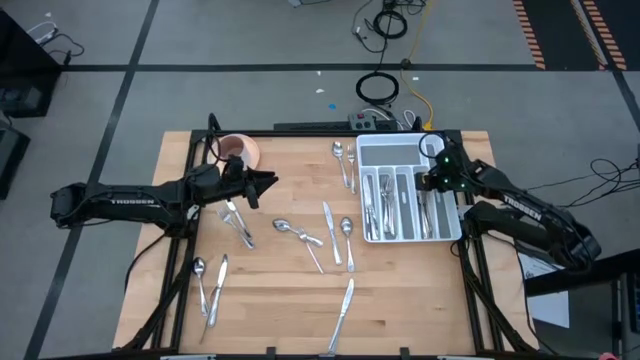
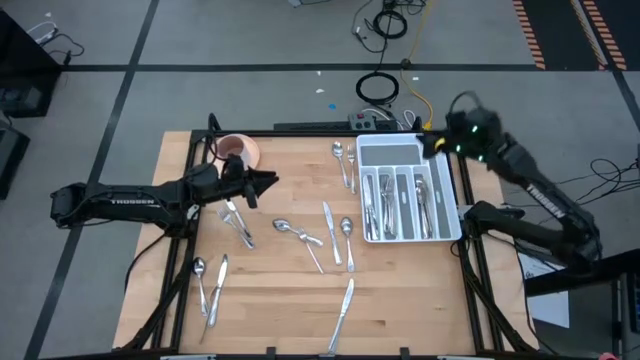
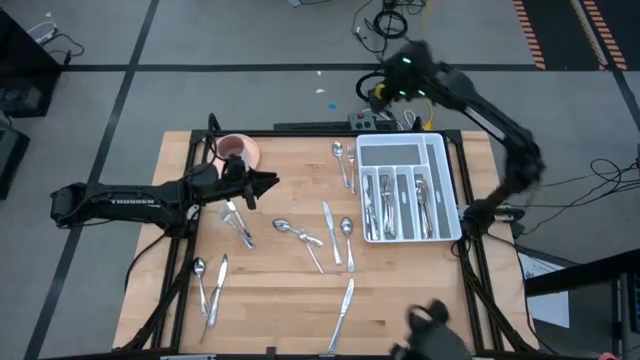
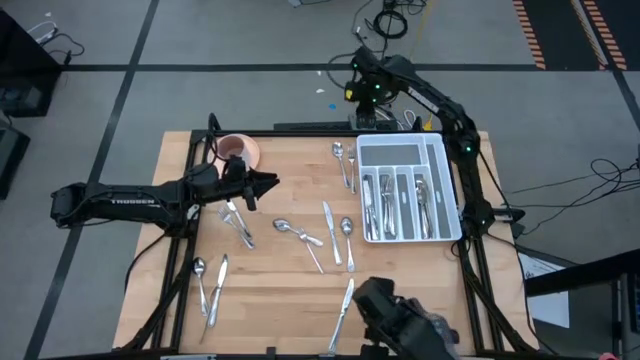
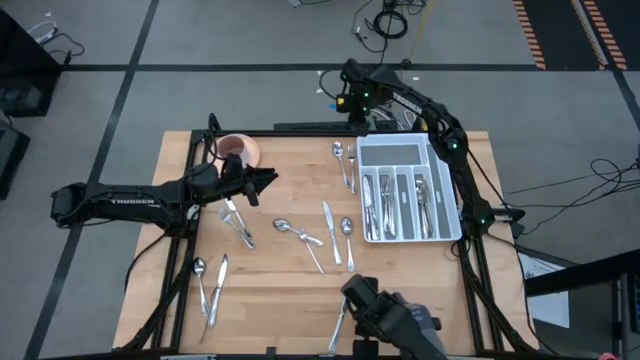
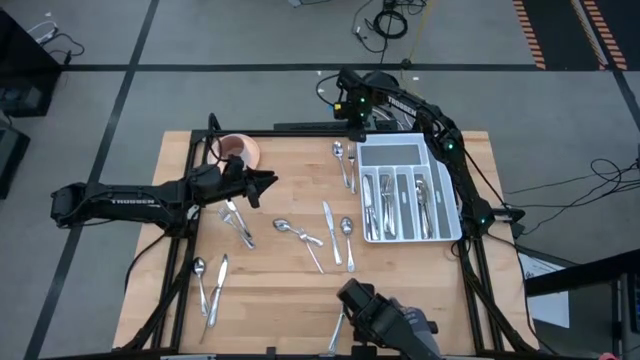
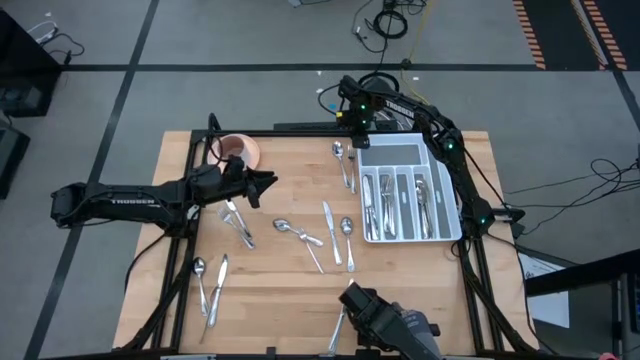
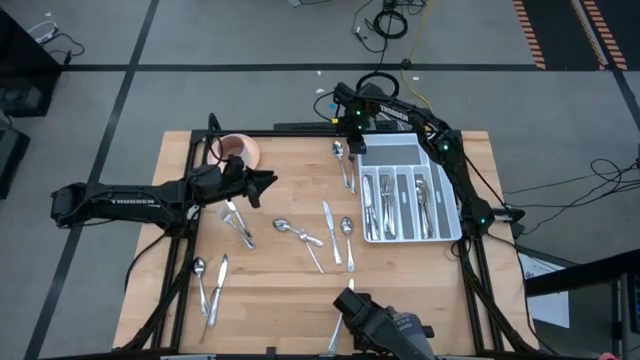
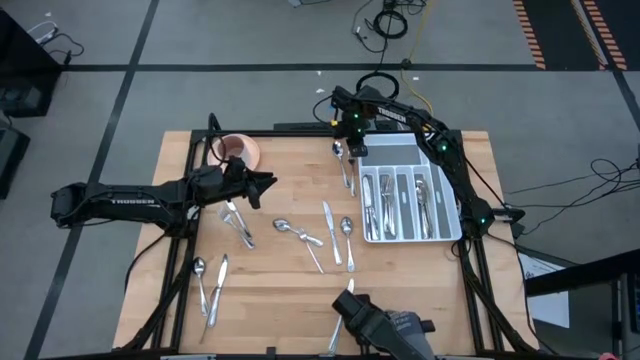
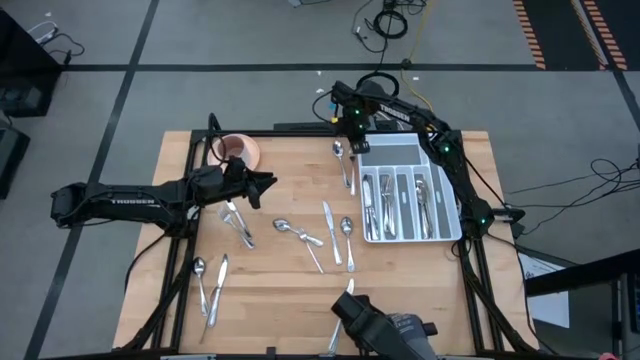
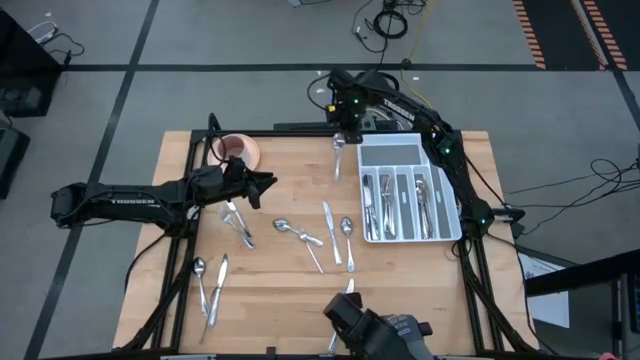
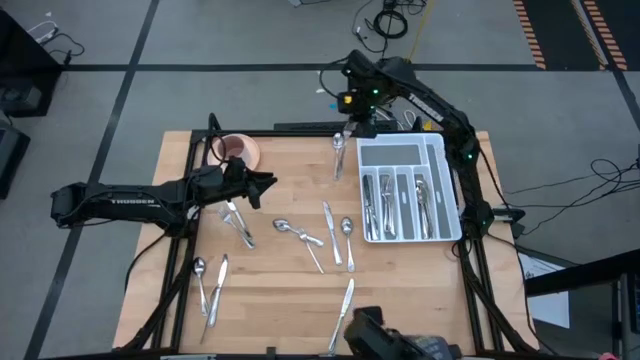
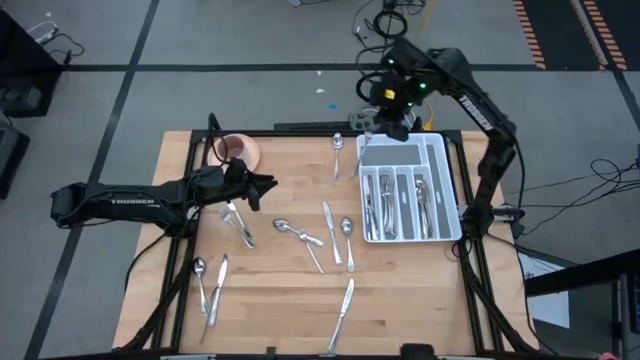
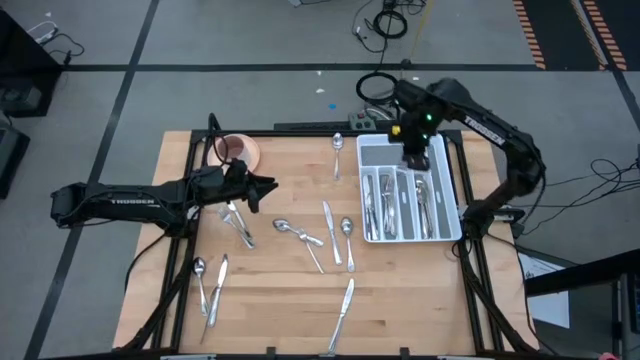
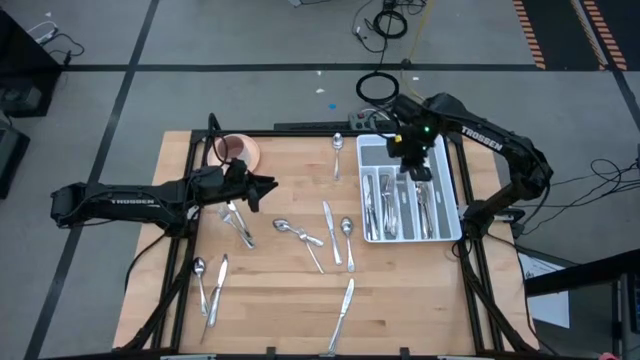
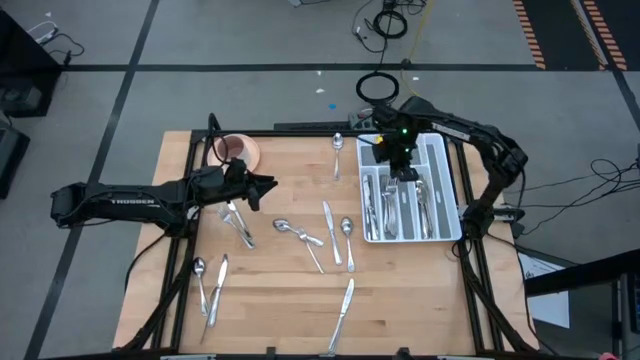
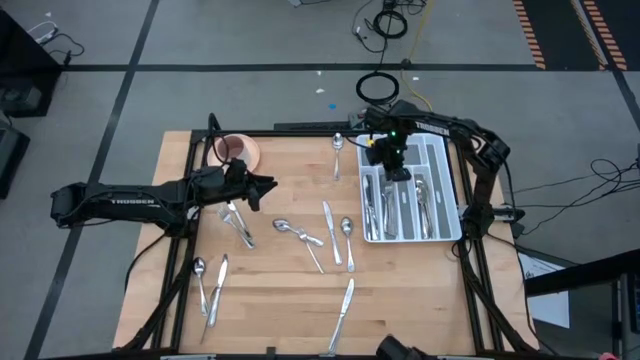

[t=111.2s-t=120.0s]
Task: Sort silverware
Put the silver fork into the silverware rack

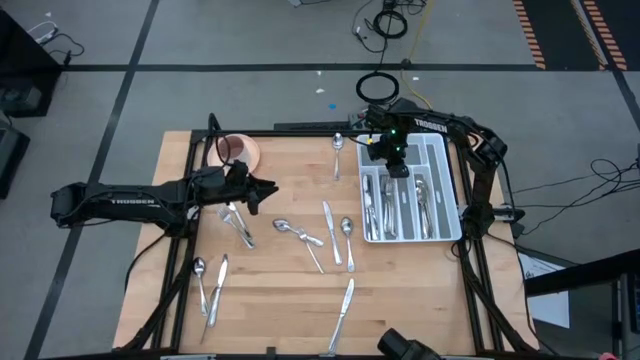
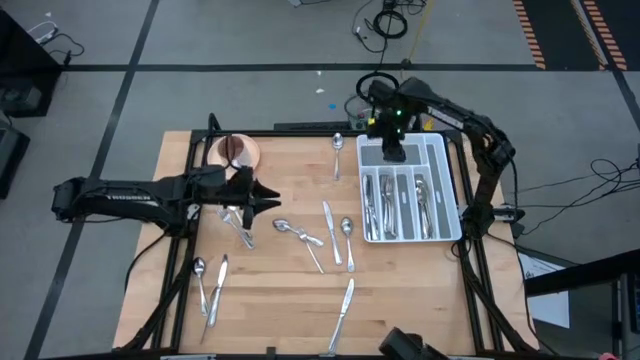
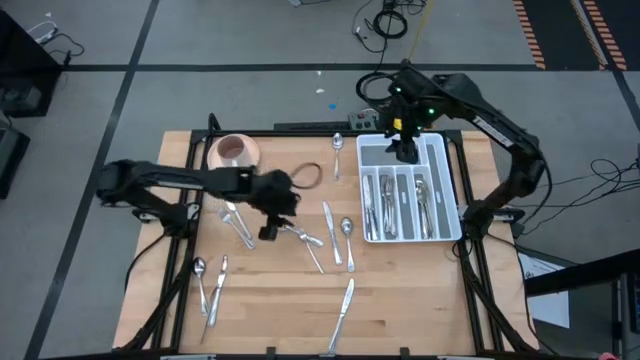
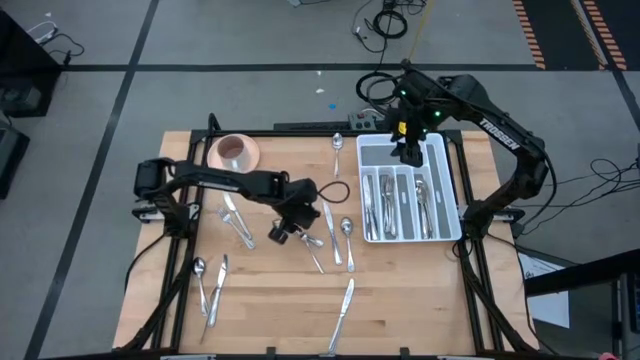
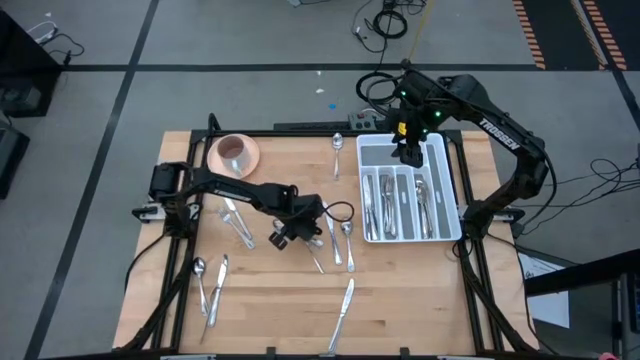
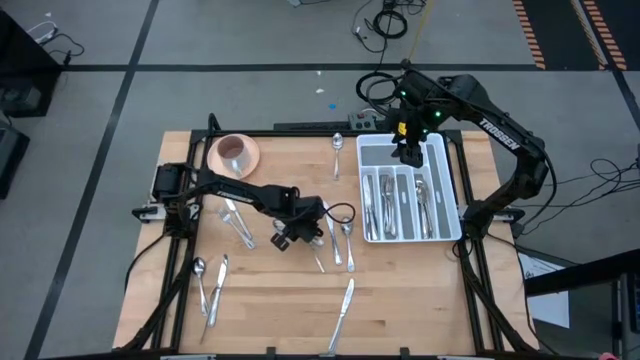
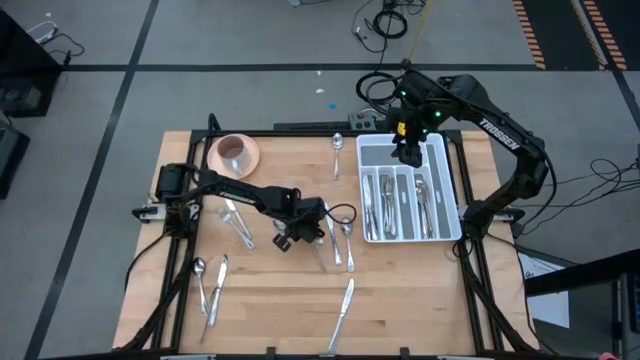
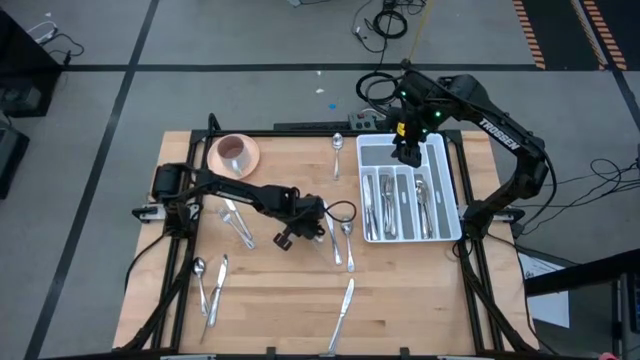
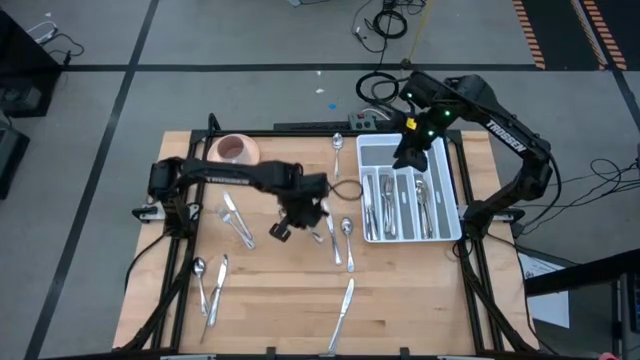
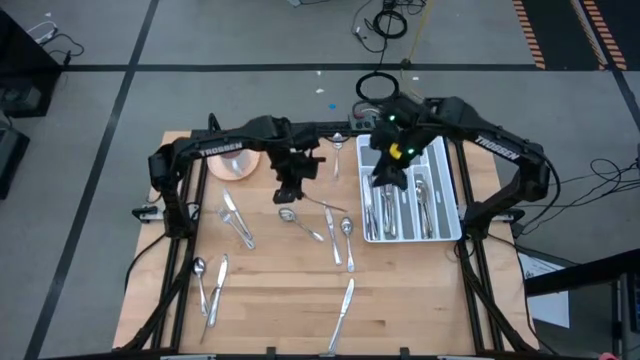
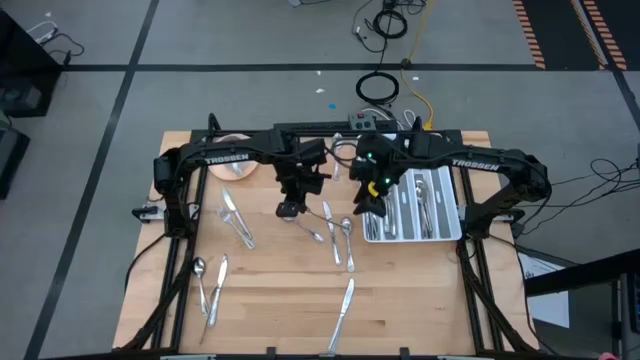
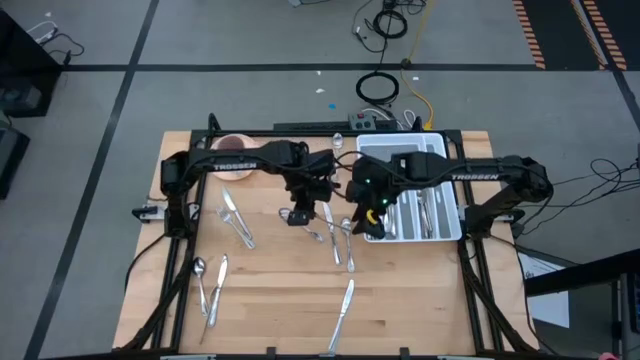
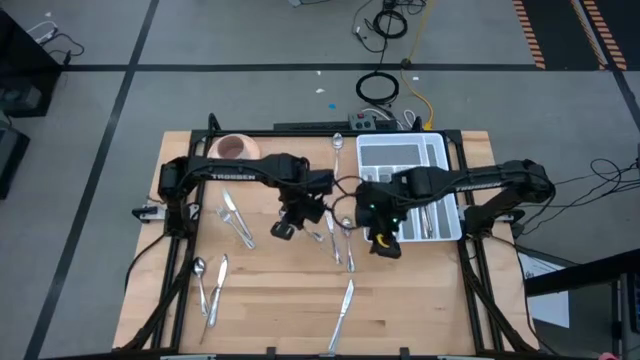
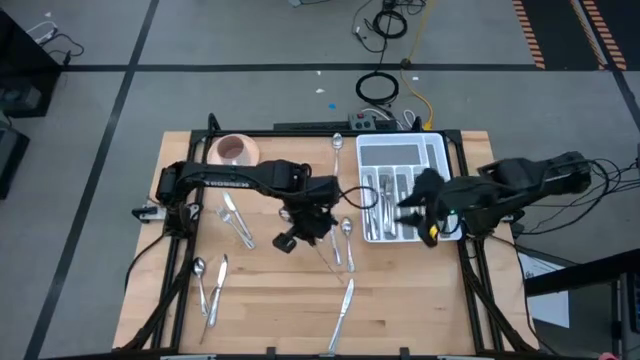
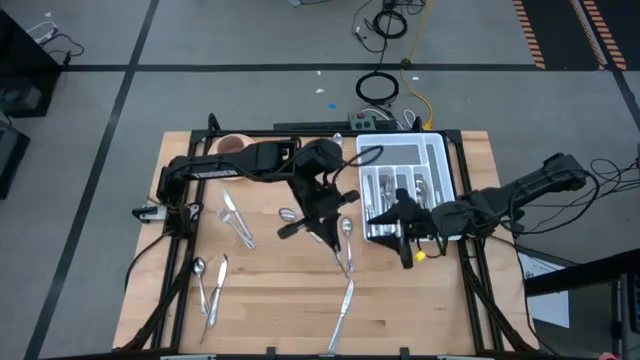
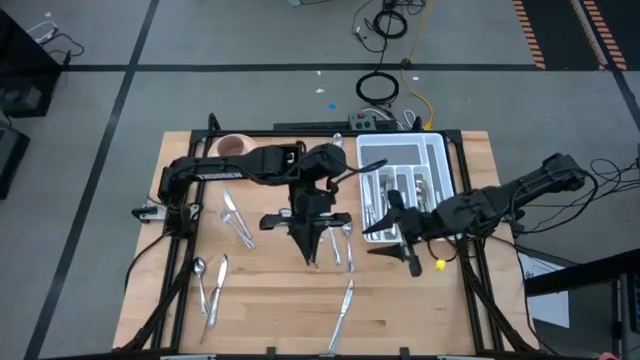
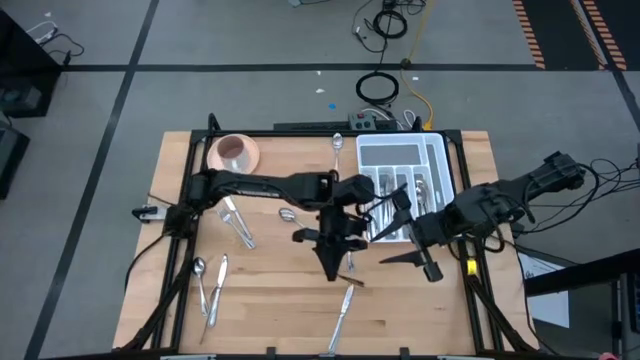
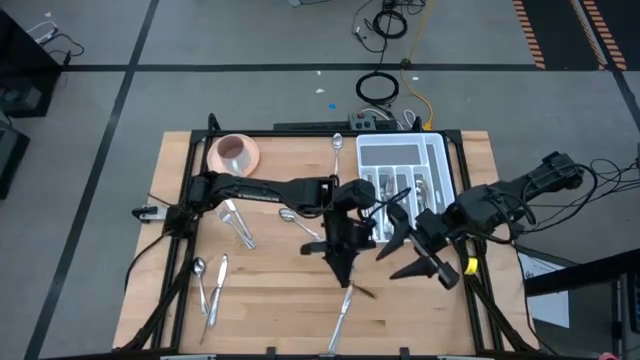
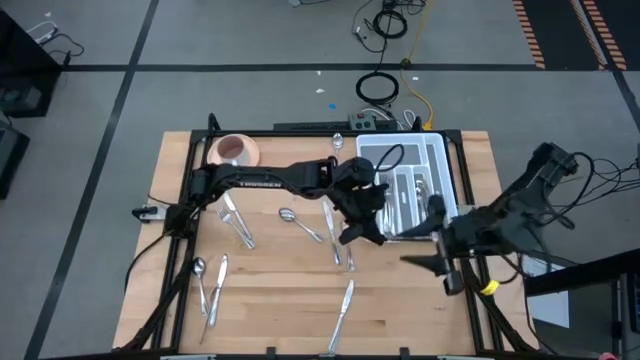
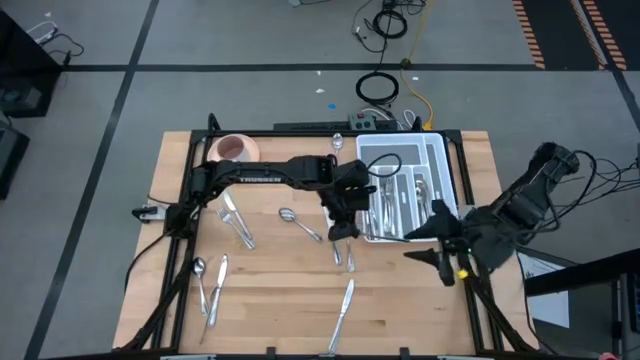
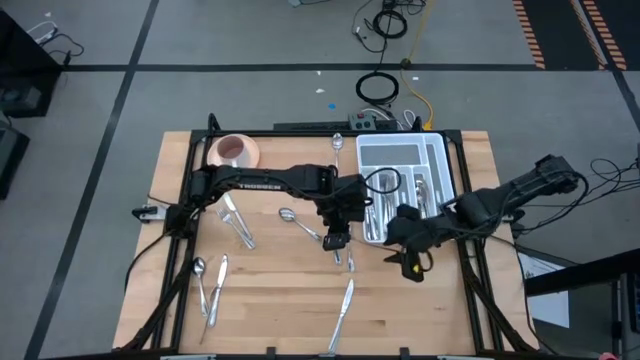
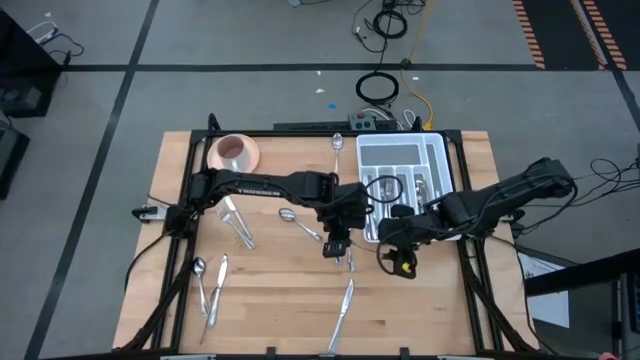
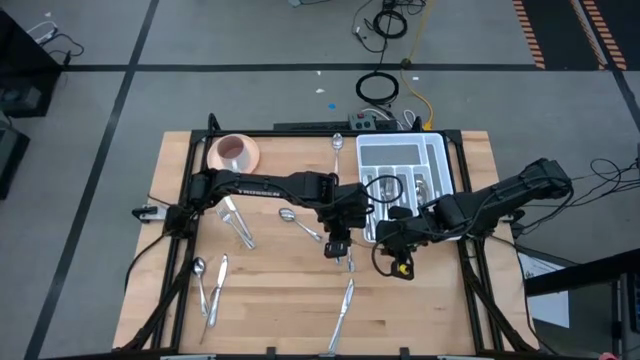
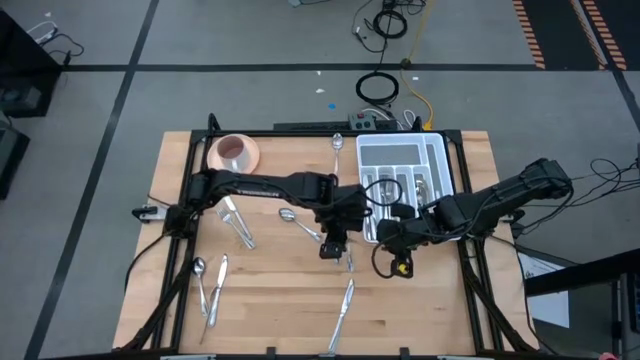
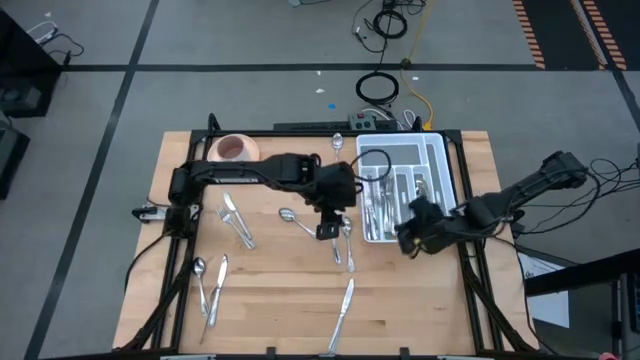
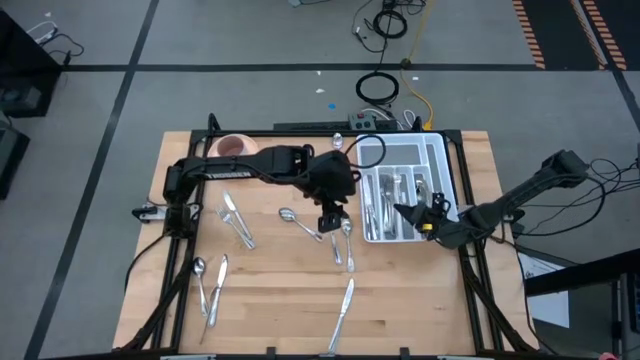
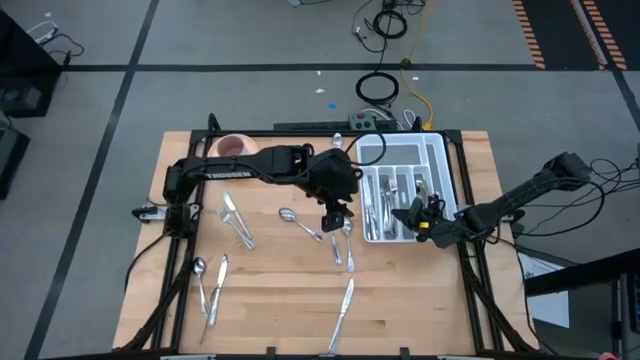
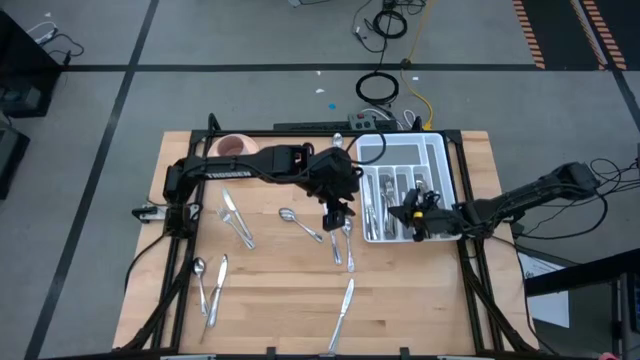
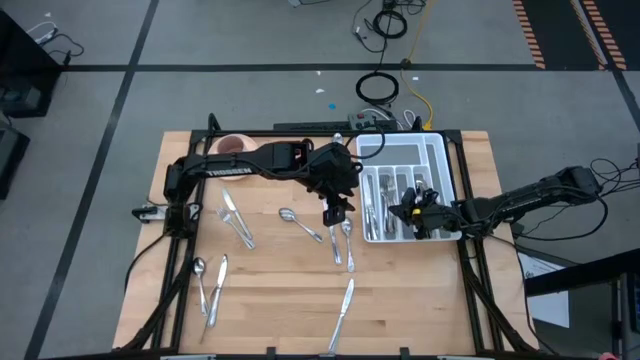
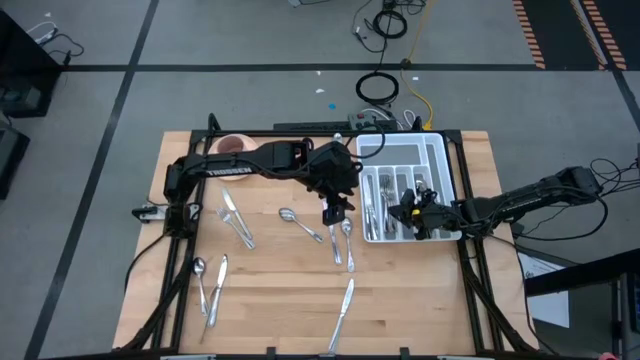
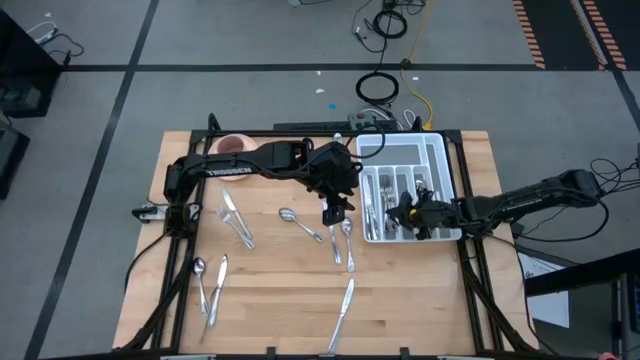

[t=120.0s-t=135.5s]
Put the silver fork into the silverware rack
